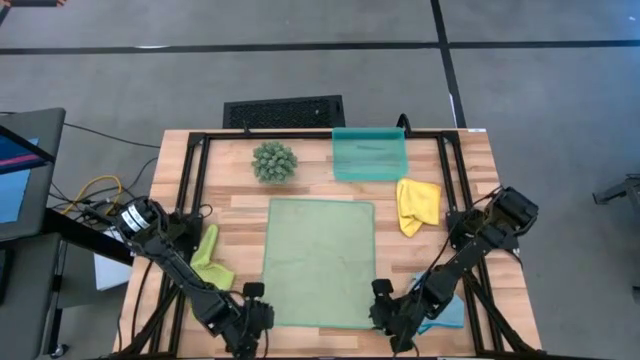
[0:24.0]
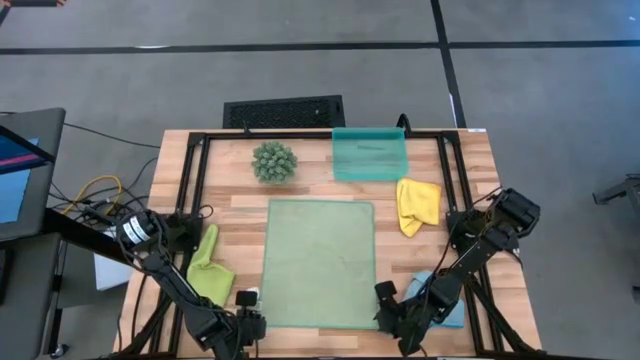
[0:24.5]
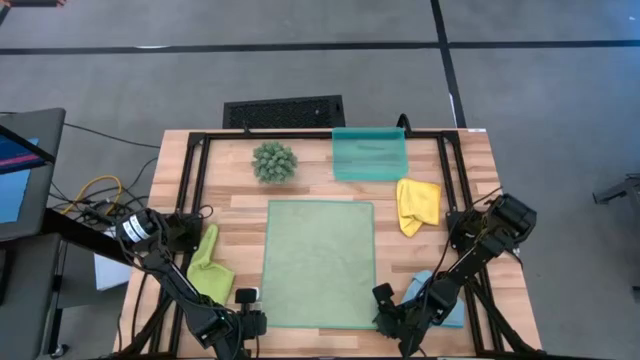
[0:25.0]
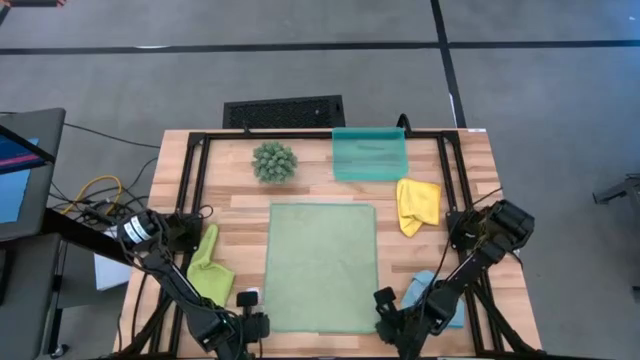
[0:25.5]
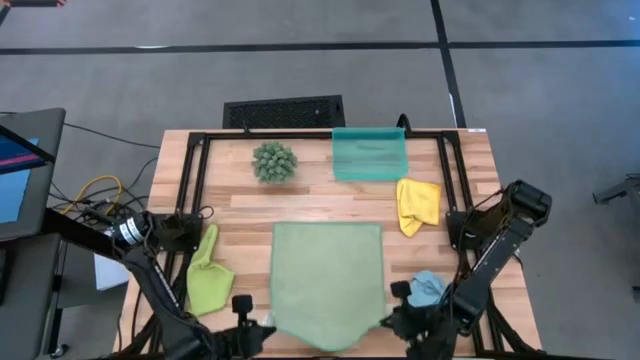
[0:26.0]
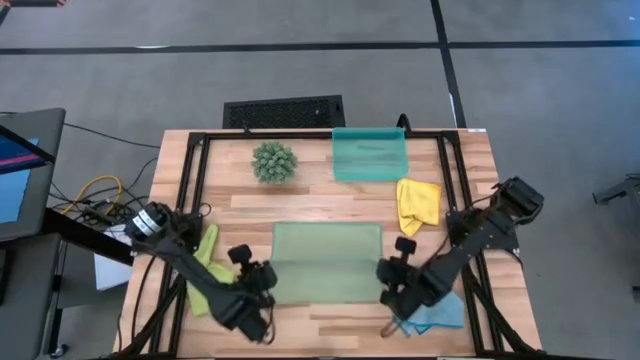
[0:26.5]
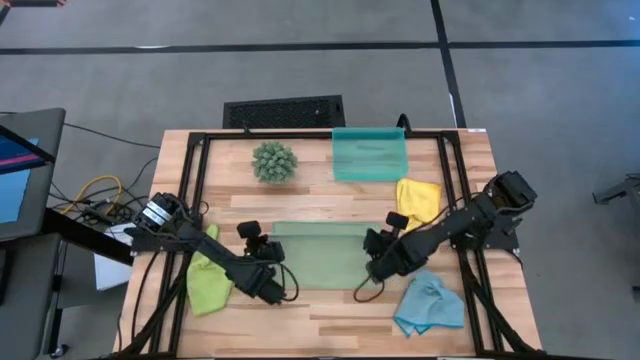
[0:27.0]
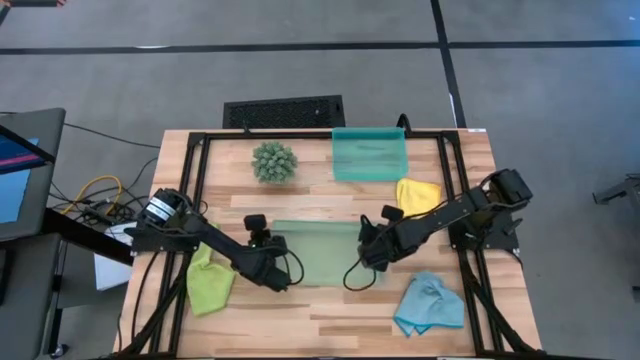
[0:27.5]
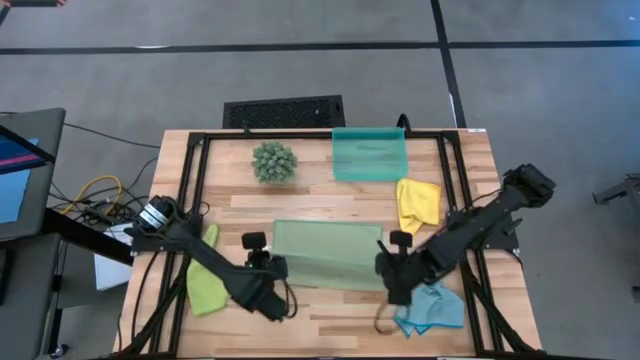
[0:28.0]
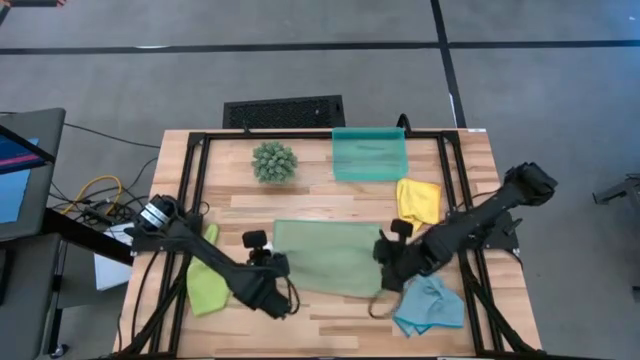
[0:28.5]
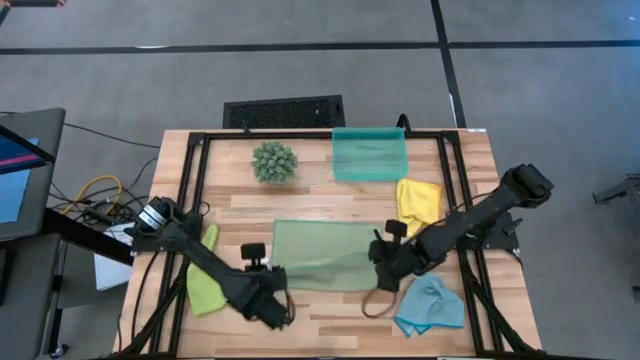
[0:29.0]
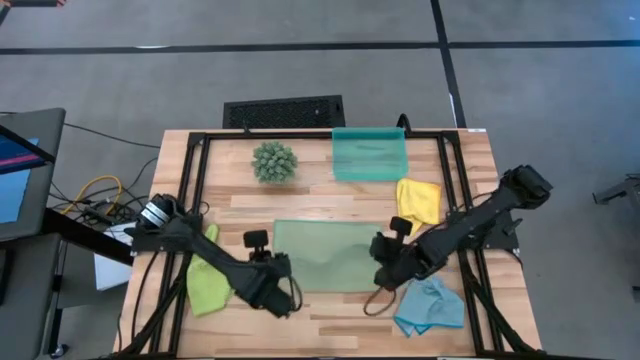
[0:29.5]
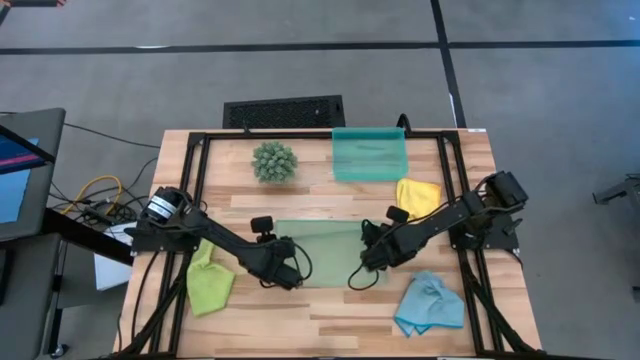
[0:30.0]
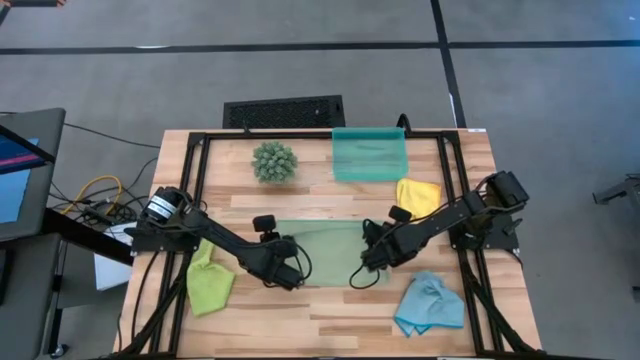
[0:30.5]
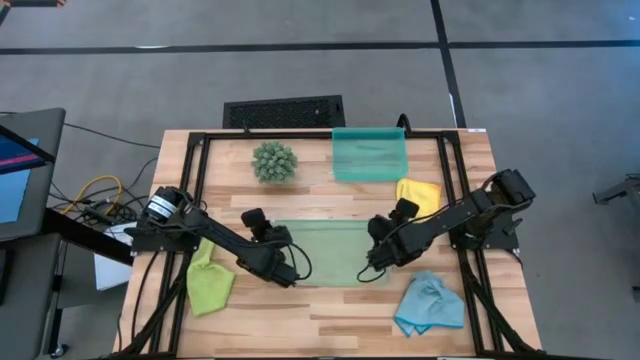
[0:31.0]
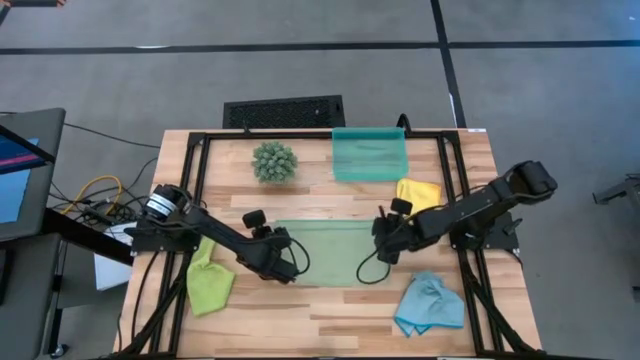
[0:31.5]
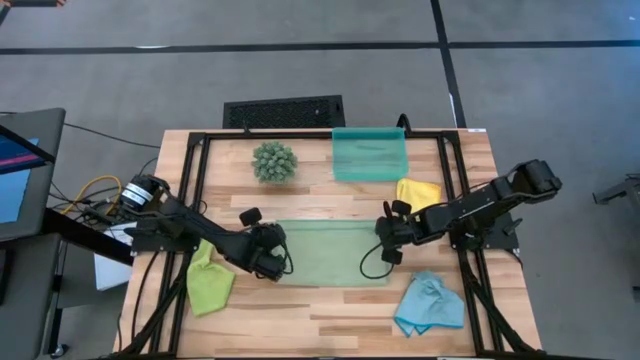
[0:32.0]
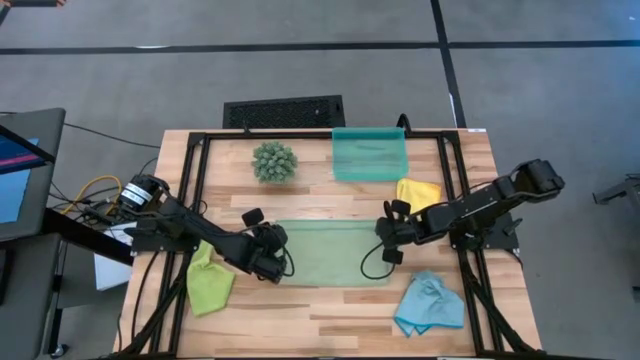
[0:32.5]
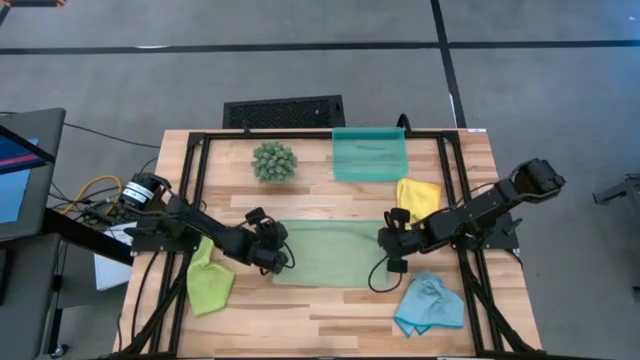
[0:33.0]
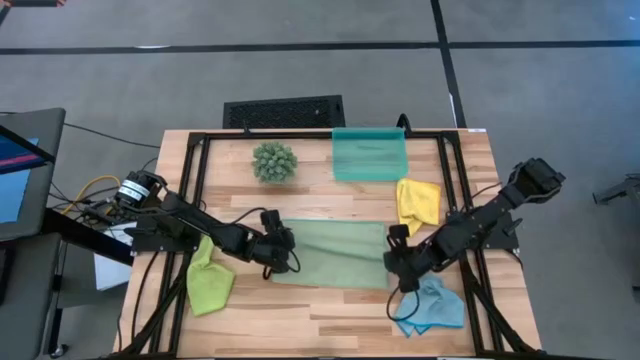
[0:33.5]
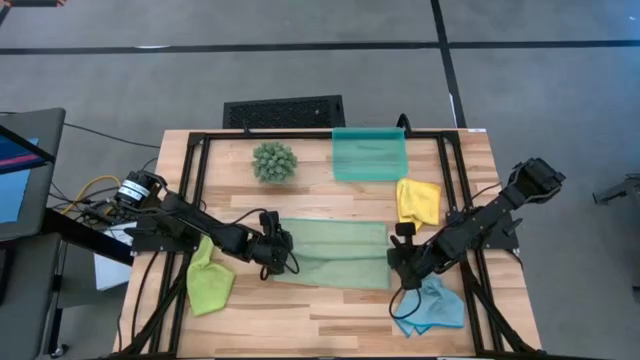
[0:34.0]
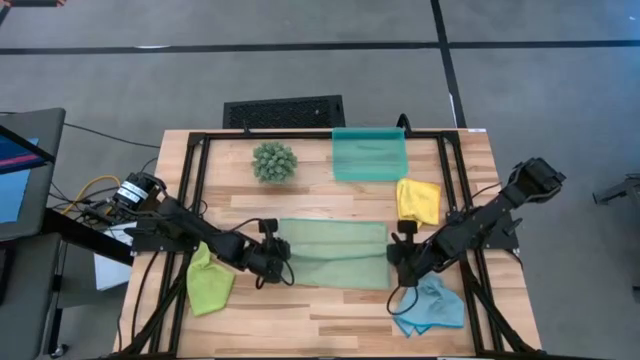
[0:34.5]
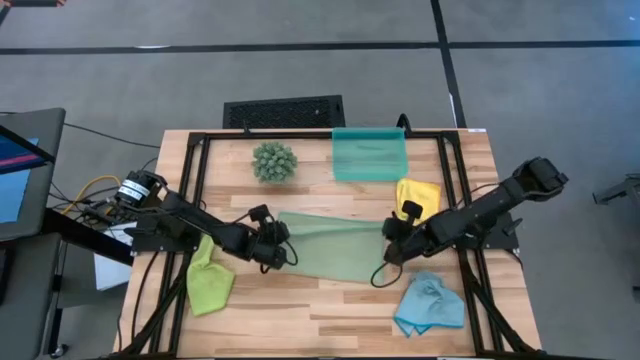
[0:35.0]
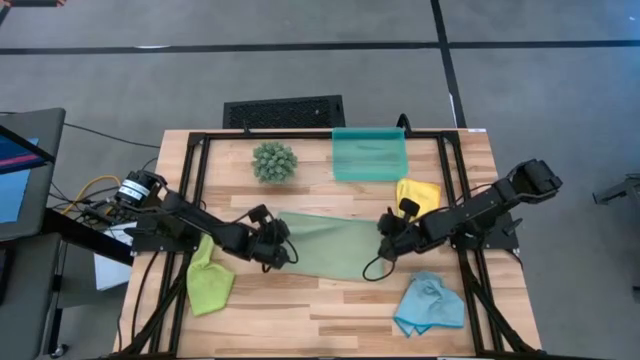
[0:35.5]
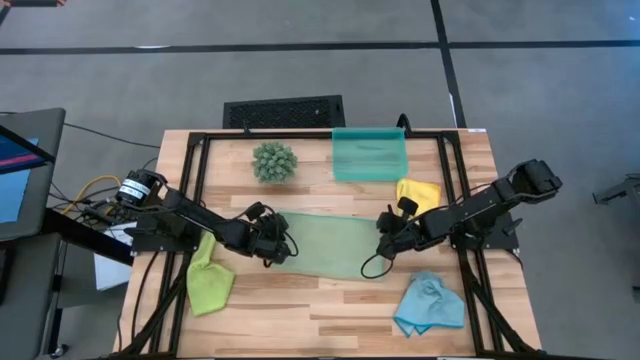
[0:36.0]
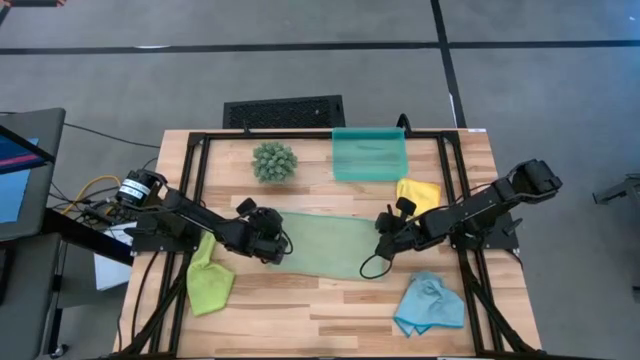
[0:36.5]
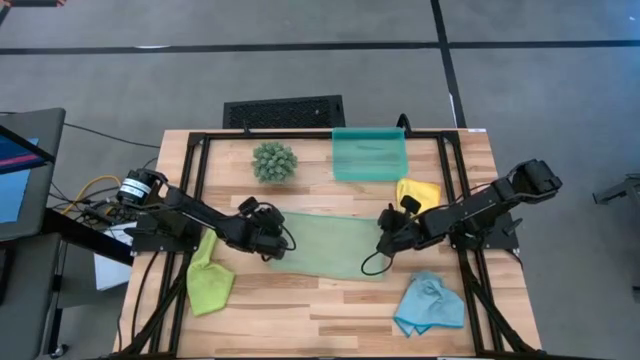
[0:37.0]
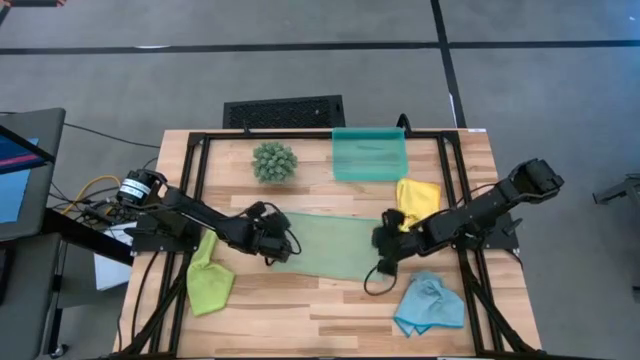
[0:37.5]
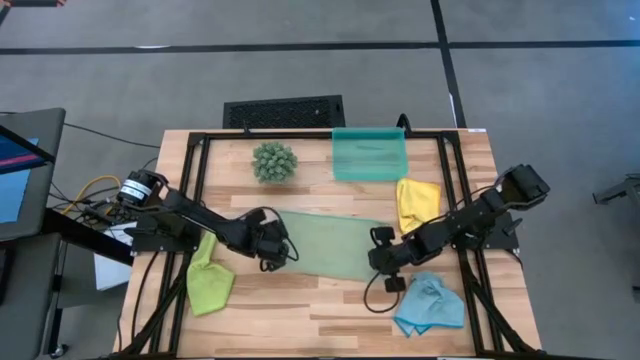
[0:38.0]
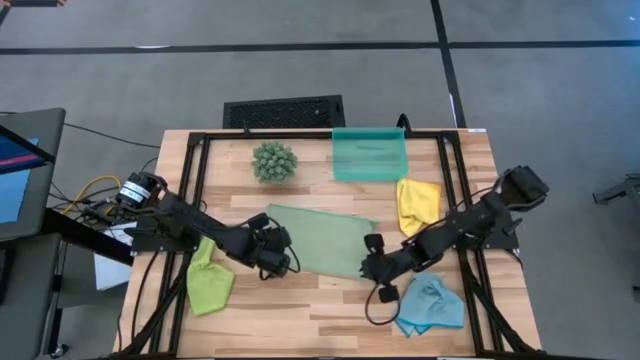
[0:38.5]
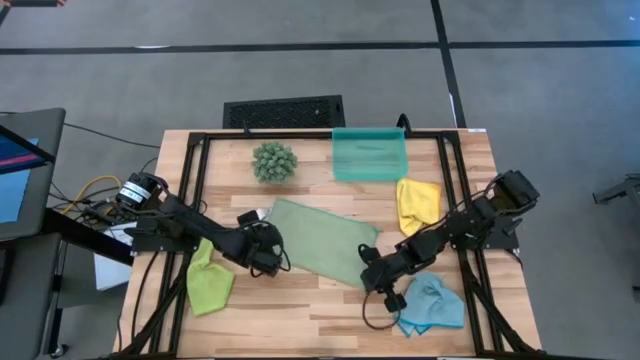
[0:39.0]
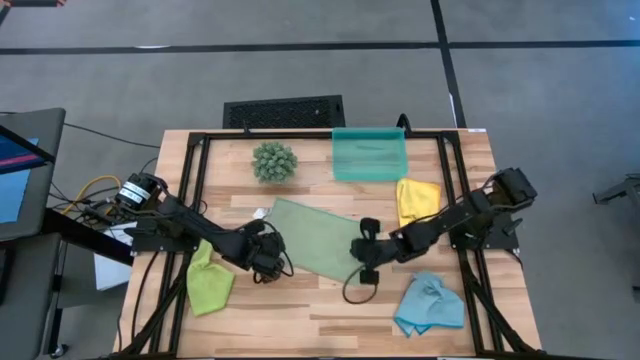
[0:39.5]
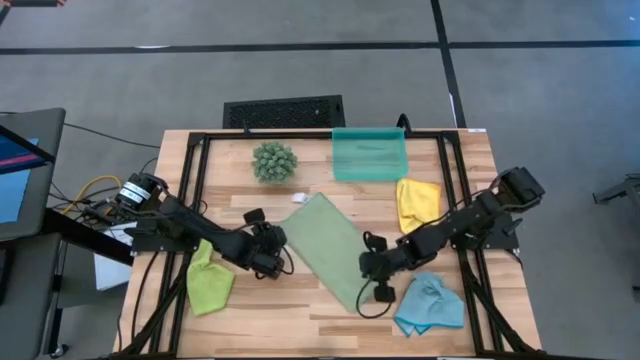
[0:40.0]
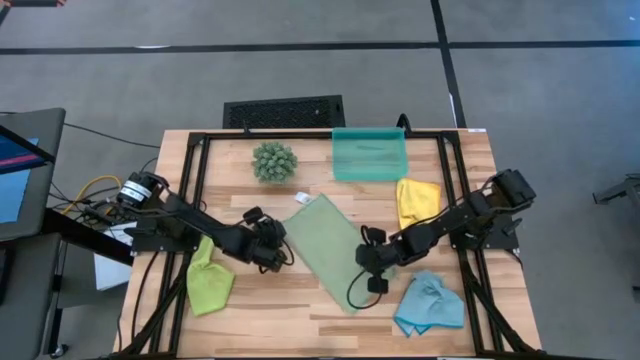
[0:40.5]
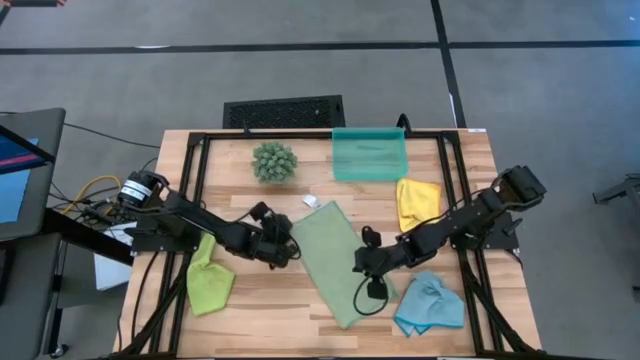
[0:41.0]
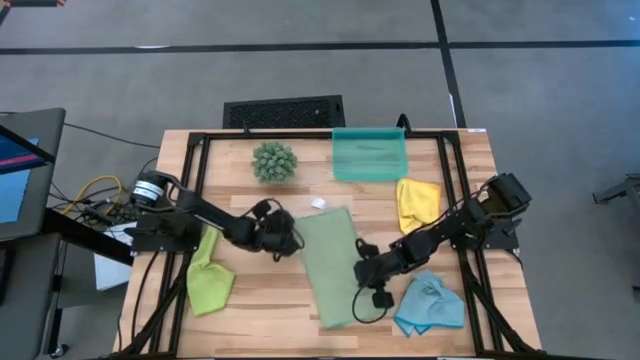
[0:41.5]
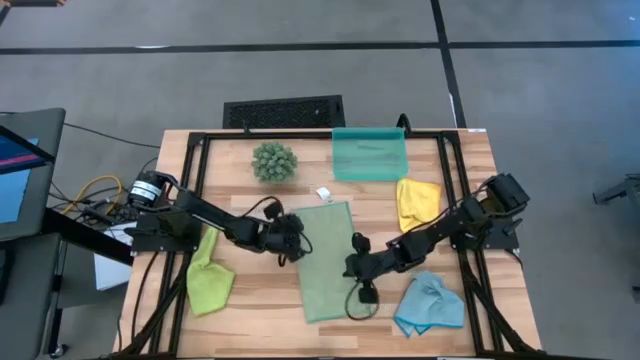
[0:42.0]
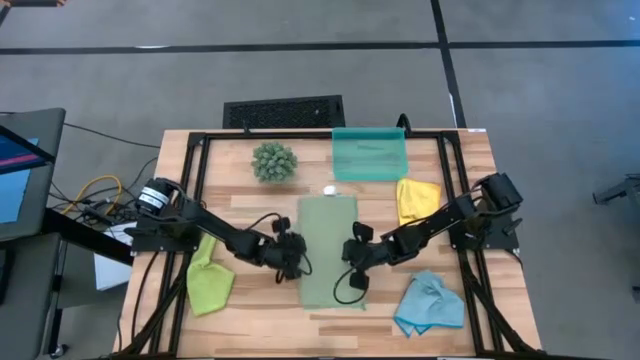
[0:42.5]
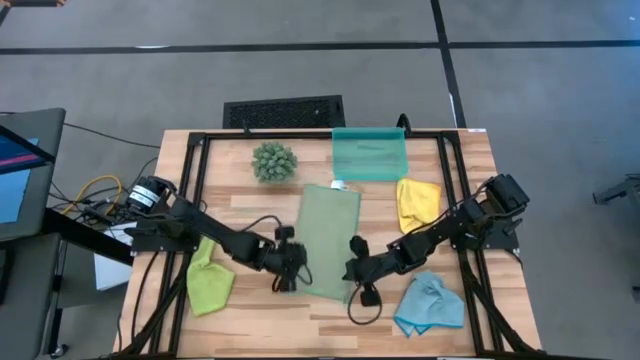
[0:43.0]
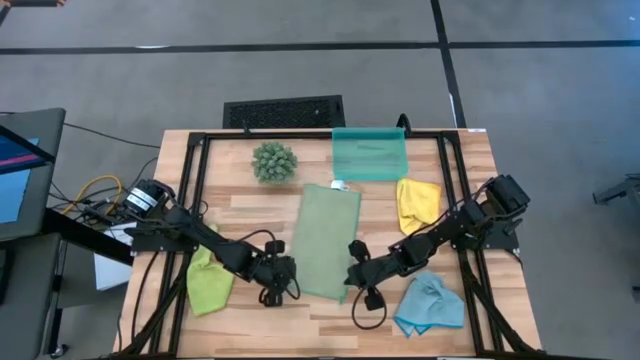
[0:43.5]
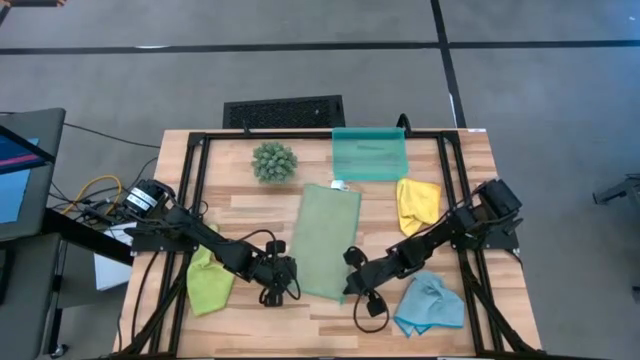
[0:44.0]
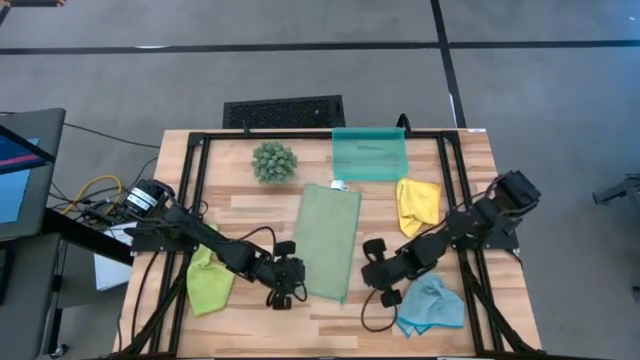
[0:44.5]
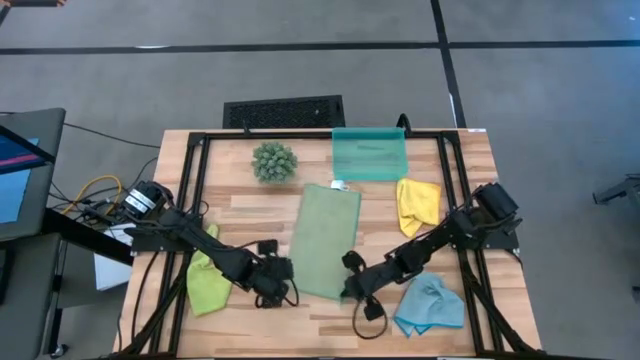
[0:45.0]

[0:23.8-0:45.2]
Task: Roll microfiber towels into tight, uniform cylinder then place into a basket
Roll the dark green microfiber cloth
